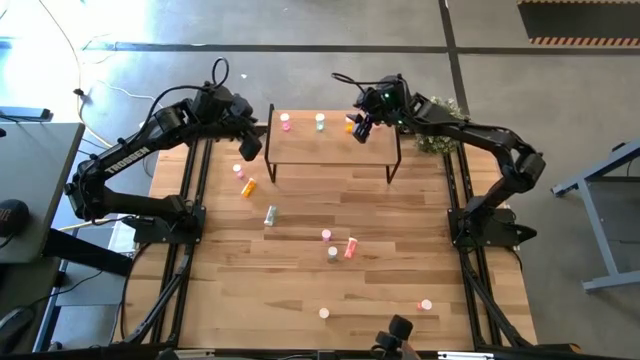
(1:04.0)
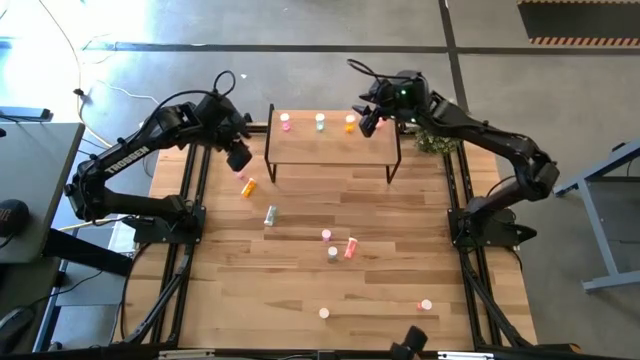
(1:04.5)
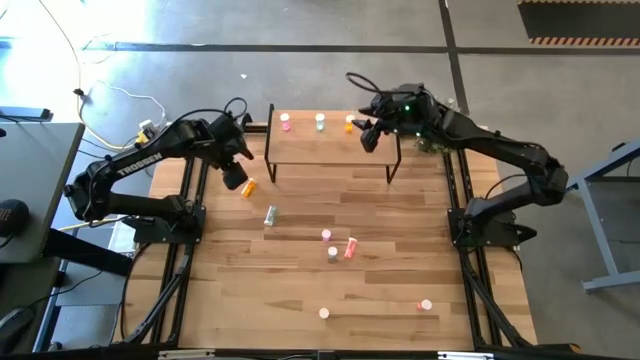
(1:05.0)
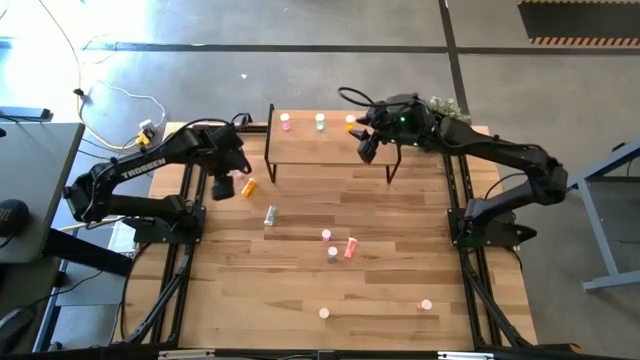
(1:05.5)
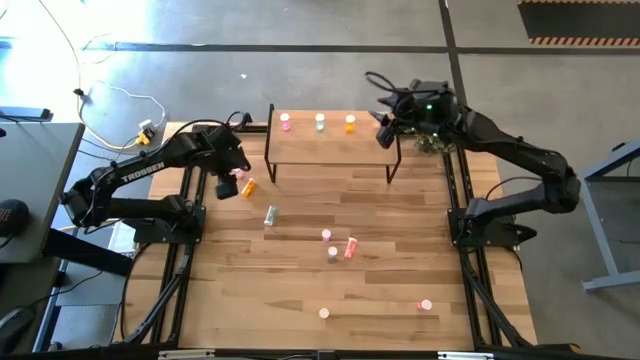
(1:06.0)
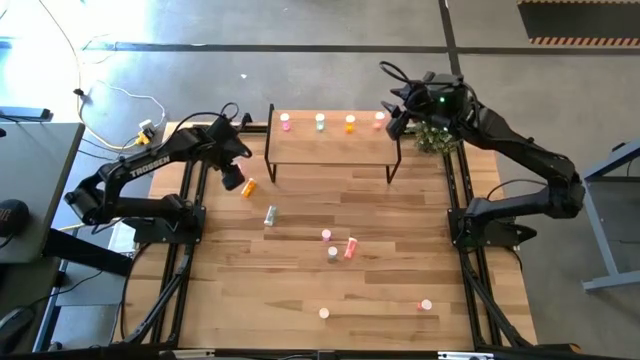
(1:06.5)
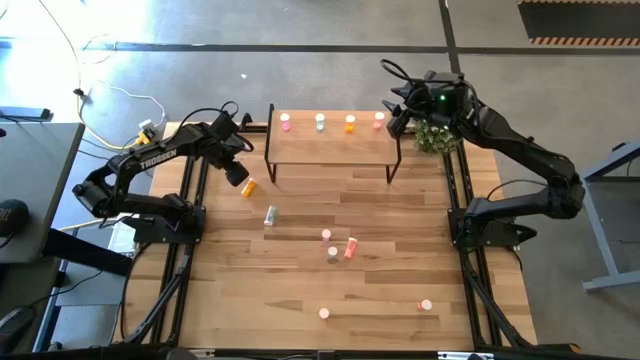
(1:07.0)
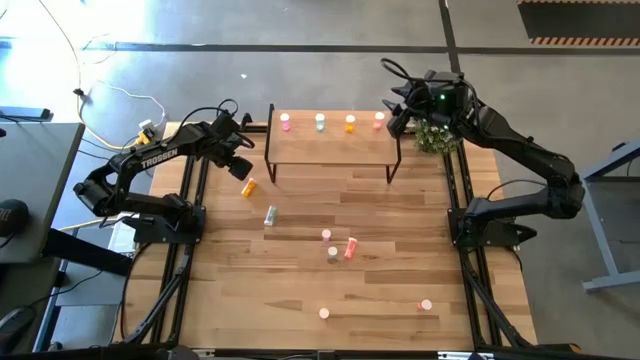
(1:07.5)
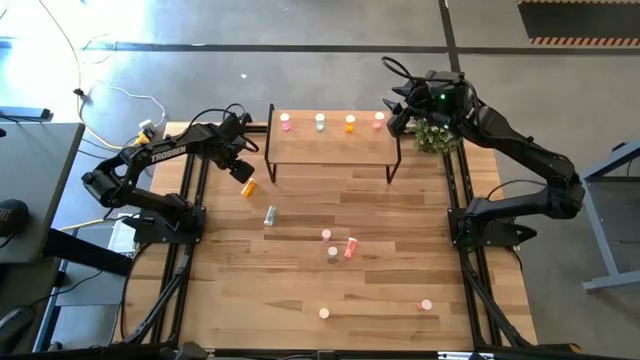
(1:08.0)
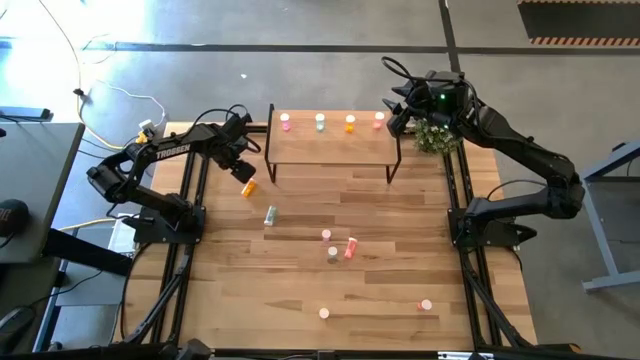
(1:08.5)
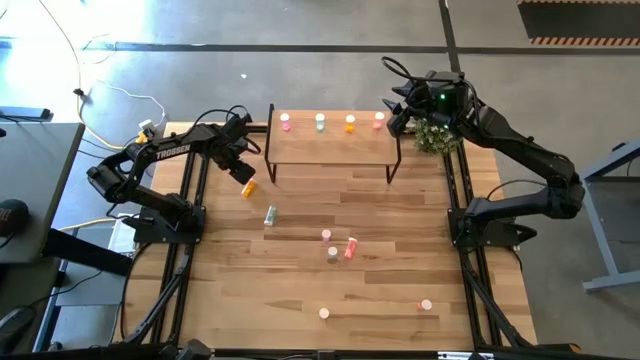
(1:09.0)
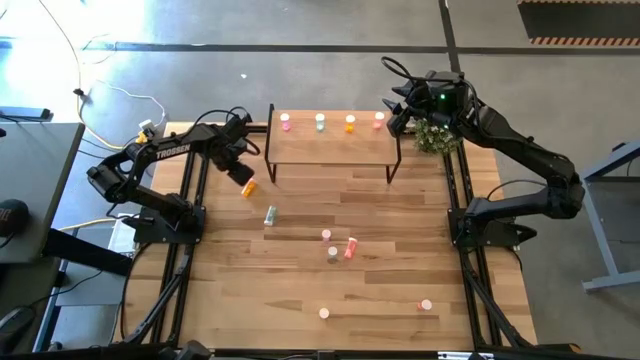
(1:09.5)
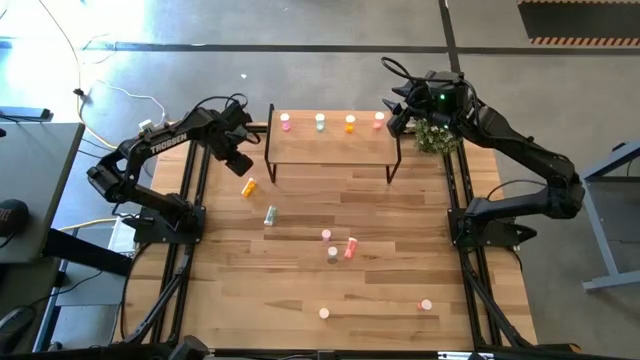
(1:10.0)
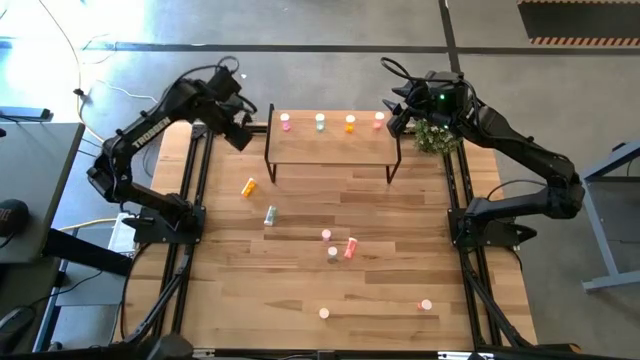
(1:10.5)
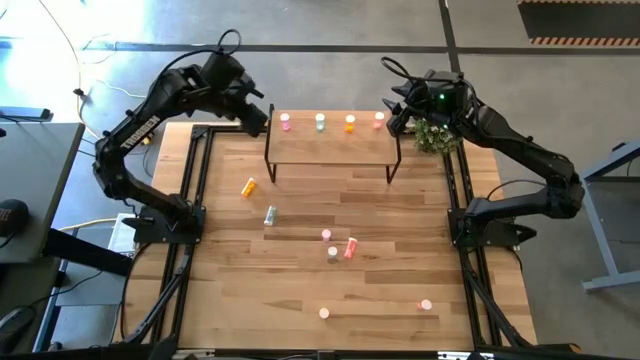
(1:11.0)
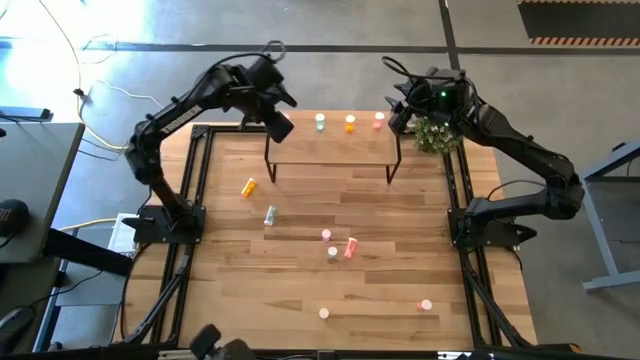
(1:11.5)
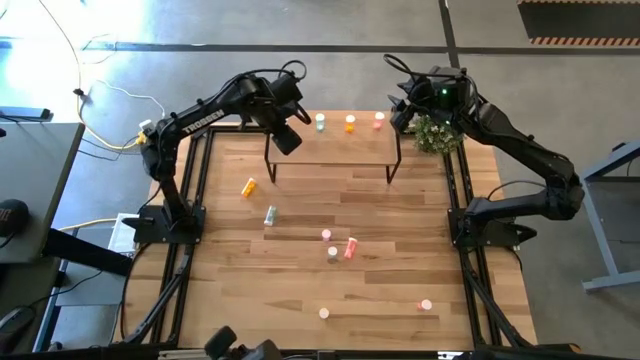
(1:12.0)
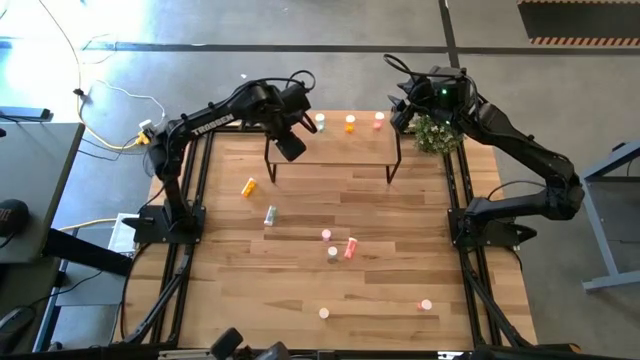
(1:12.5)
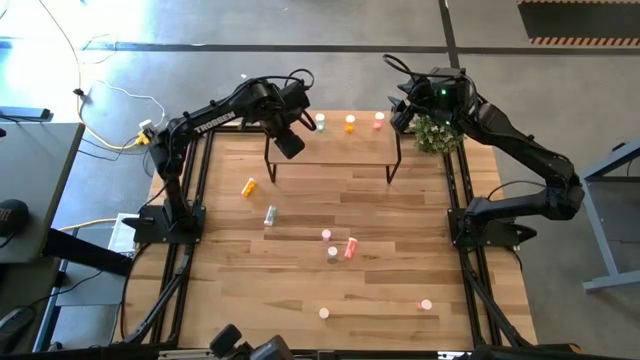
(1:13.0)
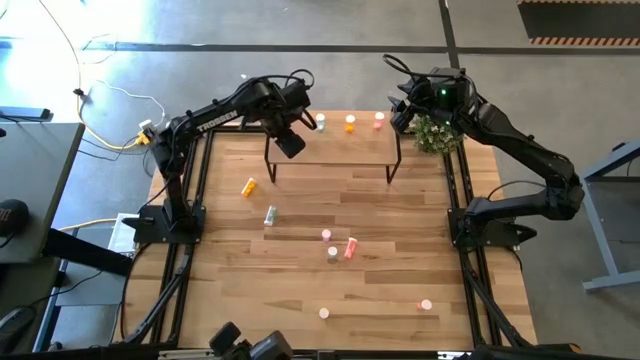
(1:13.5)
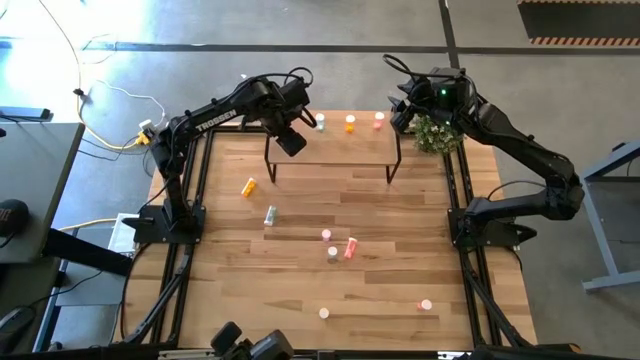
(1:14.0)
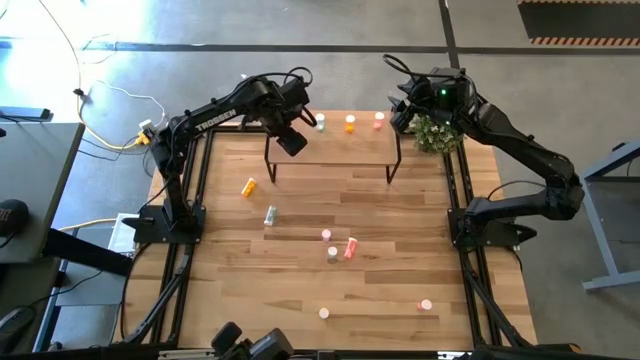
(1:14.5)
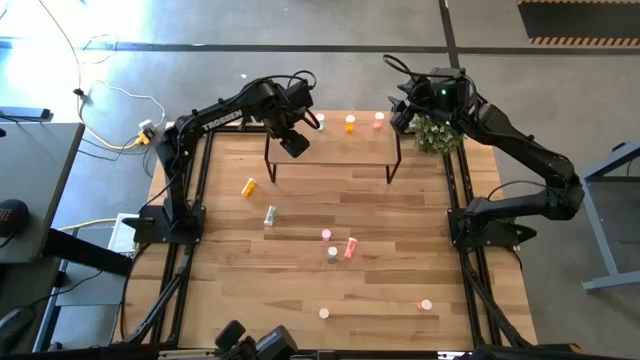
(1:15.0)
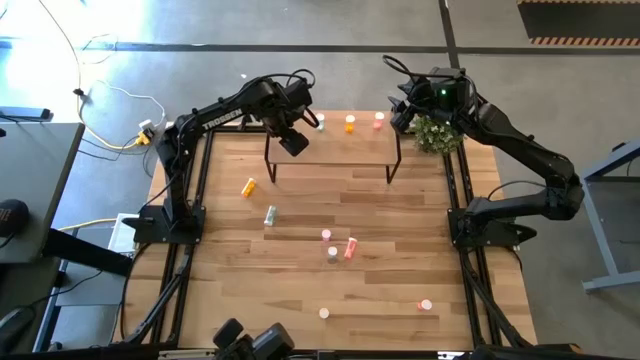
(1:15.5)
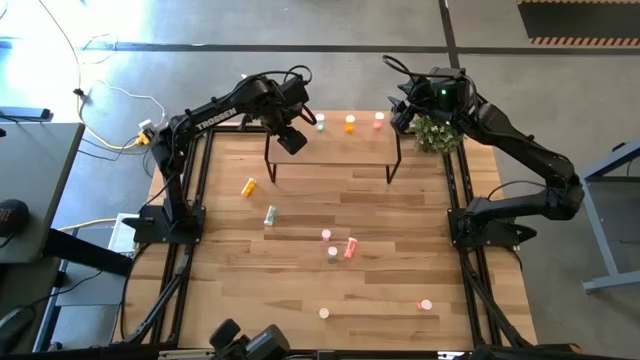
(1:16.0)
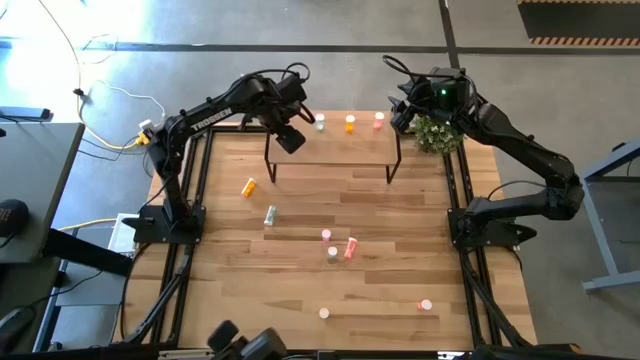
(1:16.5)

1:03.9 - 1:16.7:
Task: Pick and place medicine bottles onto shelf by color
Put the top pink pill bottle on the shelf aligned with the pink bottle

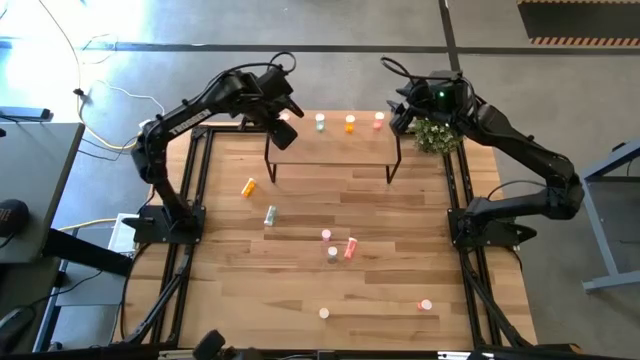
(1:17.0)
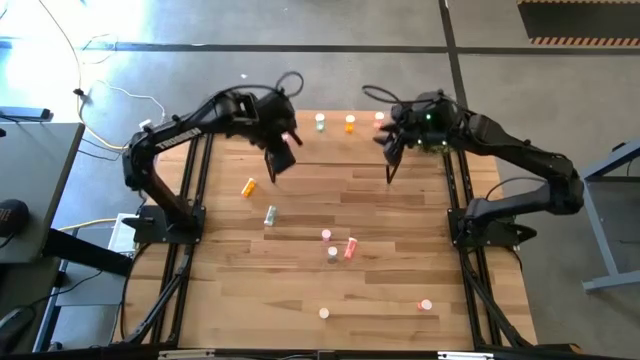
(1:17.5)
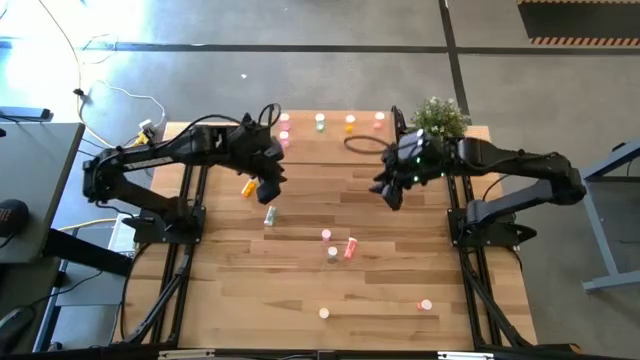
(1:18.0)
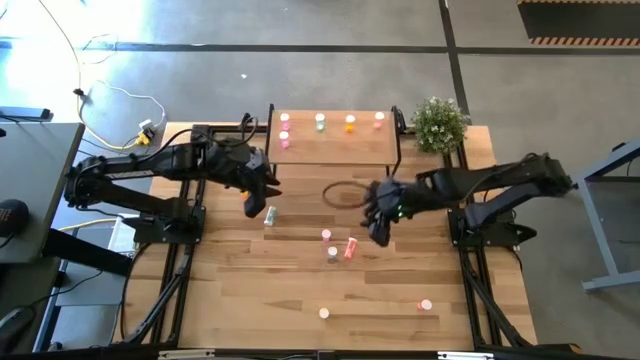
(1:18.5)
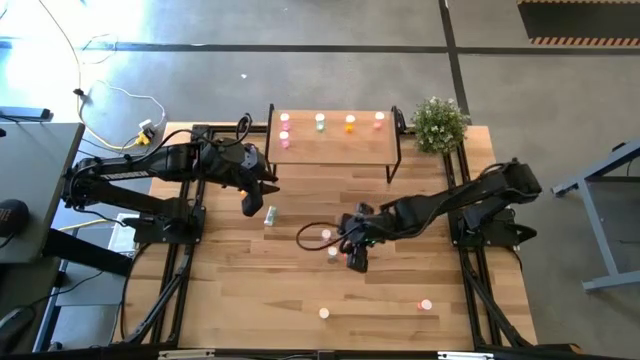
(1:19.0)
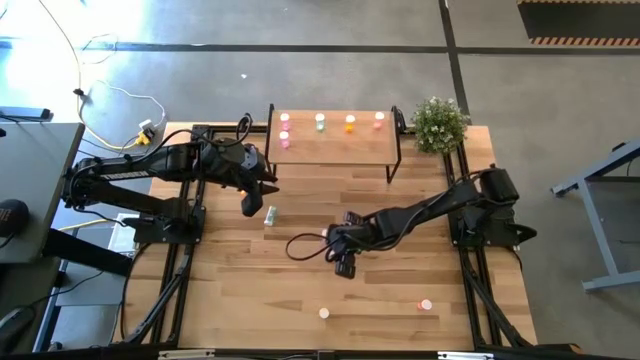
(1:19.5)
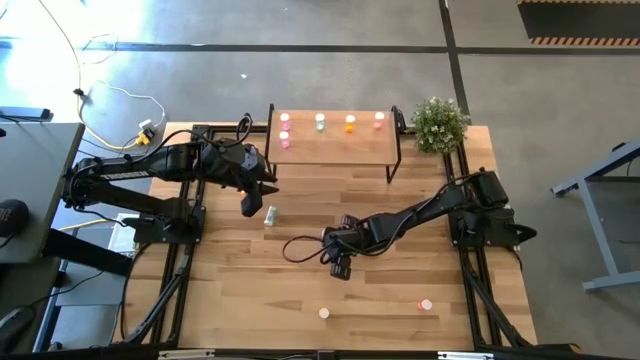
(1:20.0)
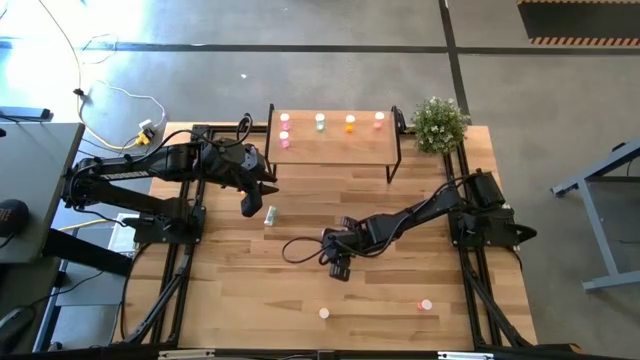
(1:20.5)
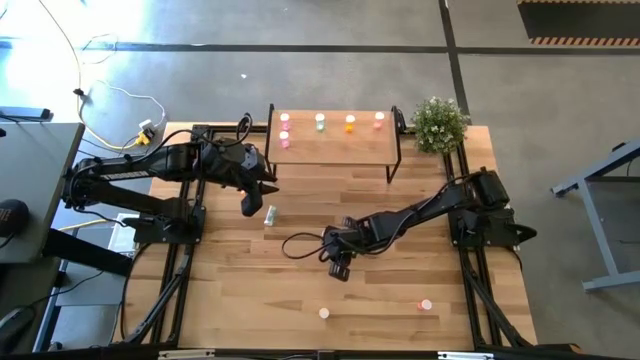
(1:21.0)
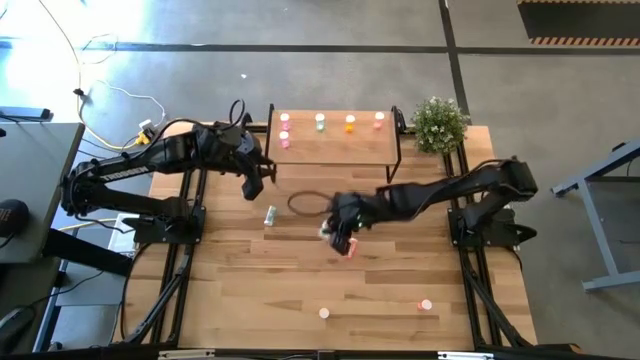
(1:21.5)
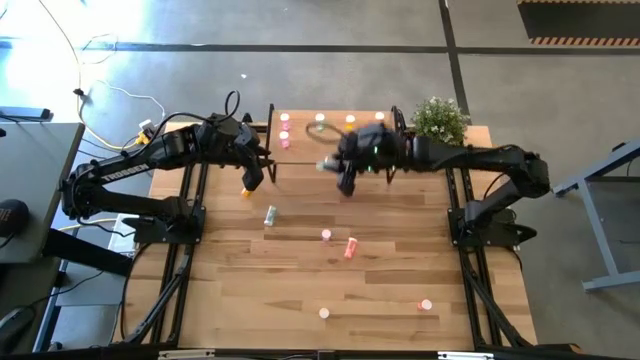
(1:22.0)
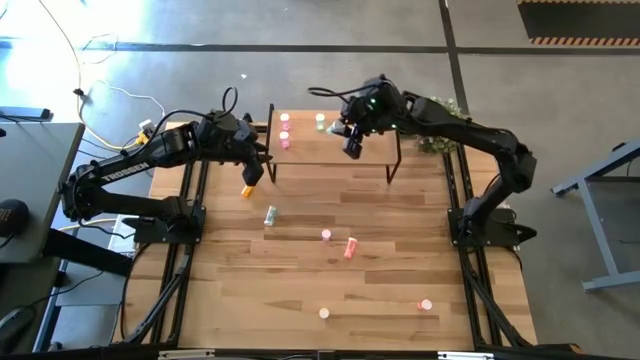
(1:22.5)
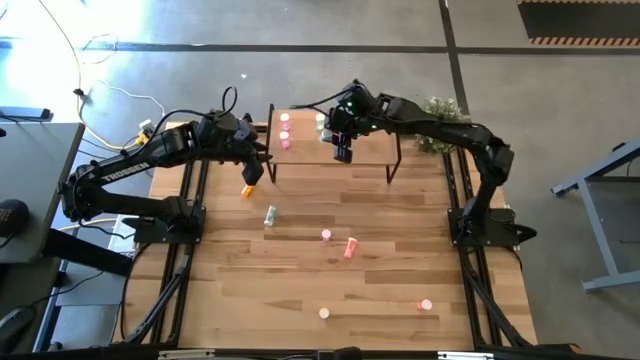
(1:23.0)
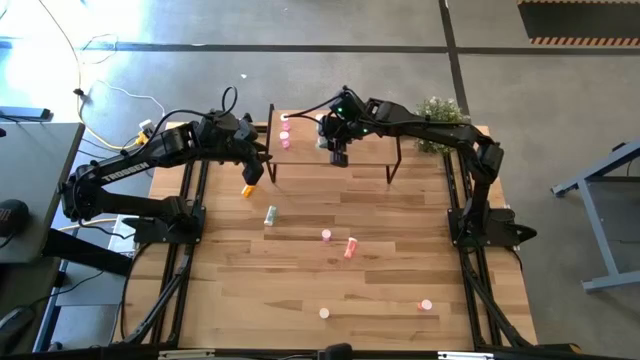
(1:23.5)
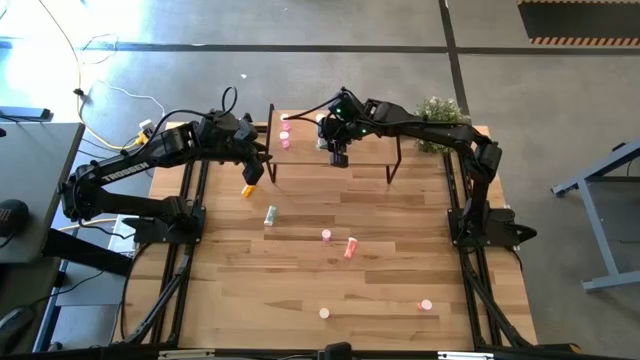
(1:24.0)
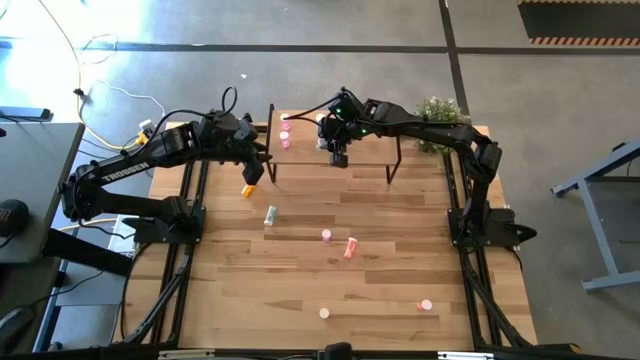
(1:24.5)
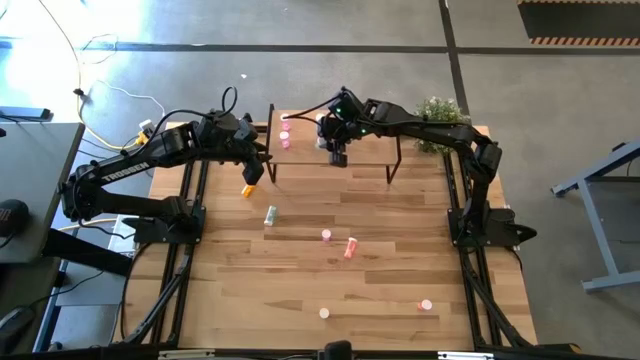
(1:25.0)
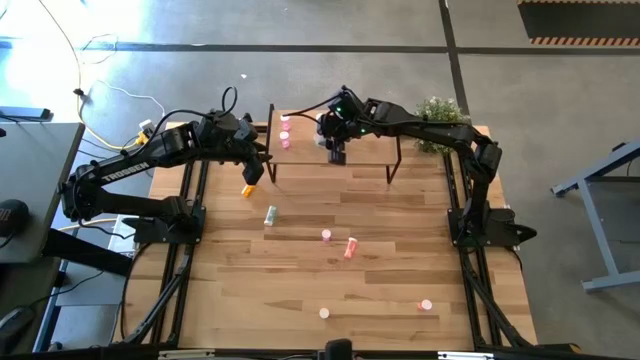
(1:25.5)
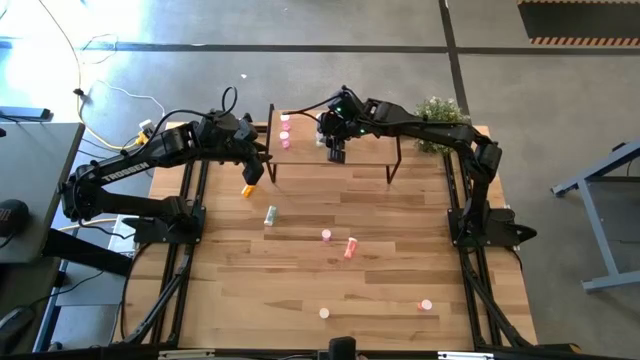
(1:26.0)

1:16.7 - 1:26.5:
Put the right blue pill bottle on the shelf aligned with the blue pill bottle
